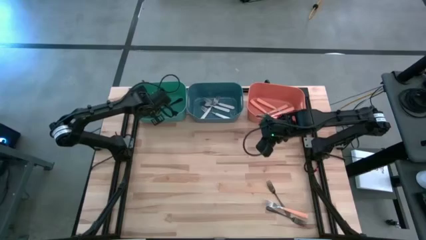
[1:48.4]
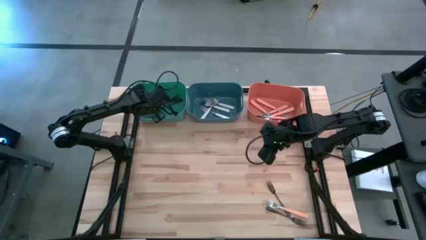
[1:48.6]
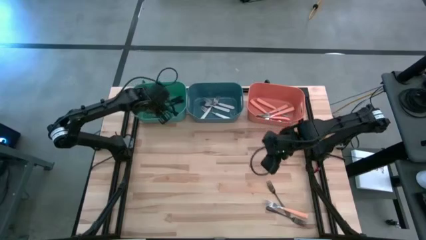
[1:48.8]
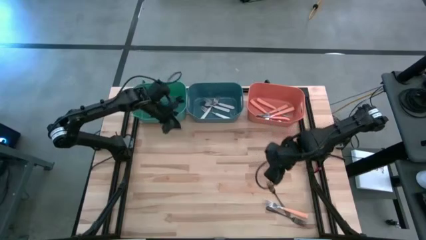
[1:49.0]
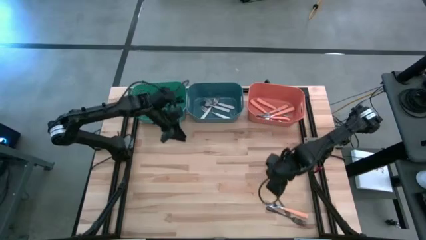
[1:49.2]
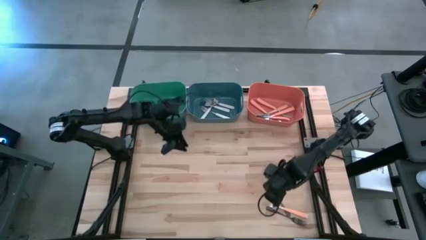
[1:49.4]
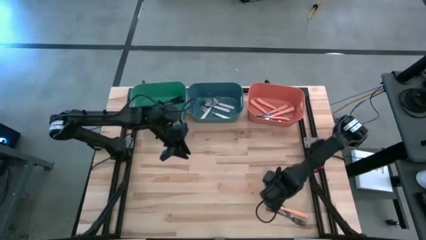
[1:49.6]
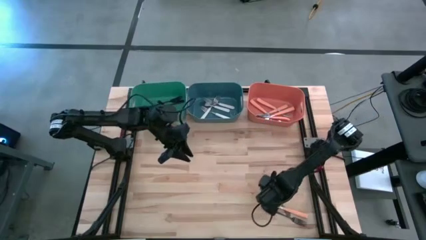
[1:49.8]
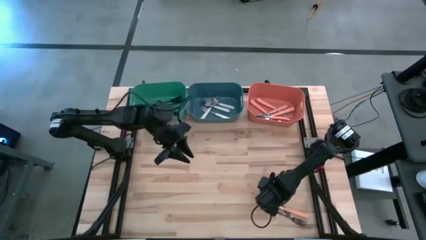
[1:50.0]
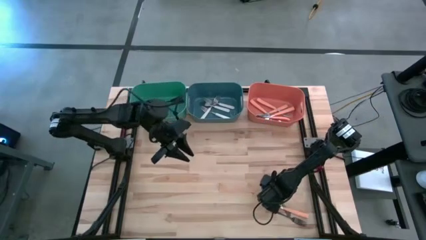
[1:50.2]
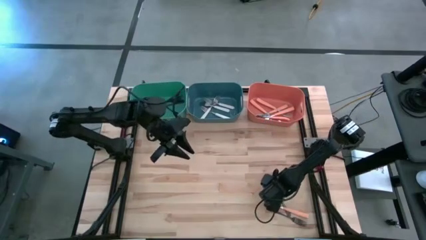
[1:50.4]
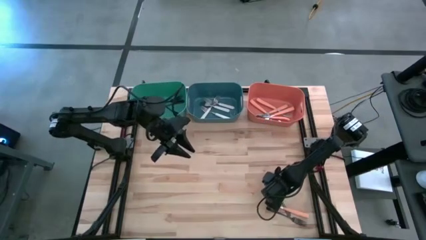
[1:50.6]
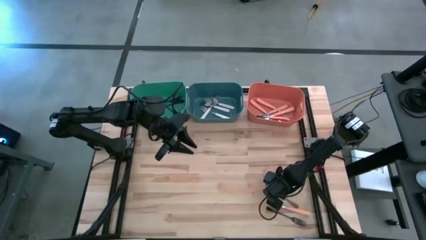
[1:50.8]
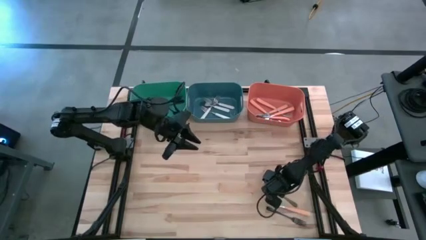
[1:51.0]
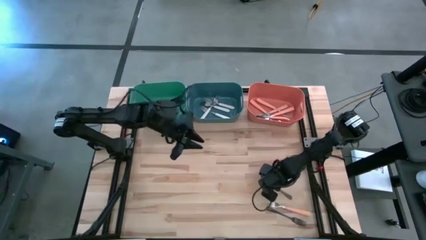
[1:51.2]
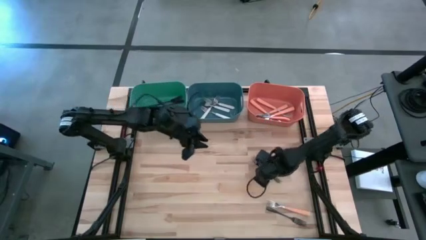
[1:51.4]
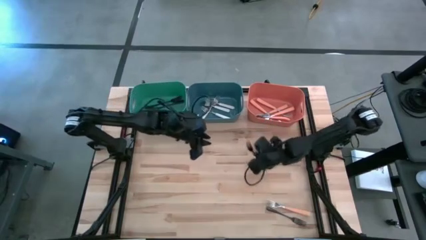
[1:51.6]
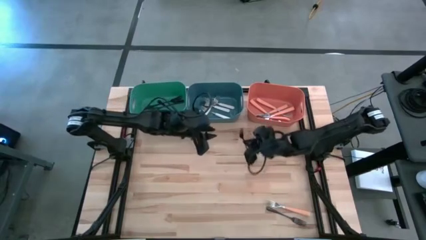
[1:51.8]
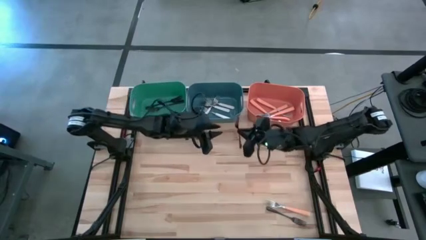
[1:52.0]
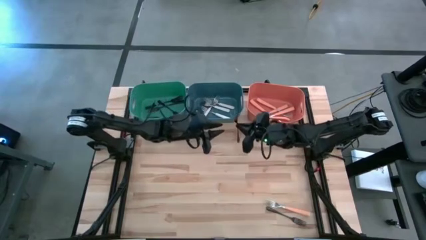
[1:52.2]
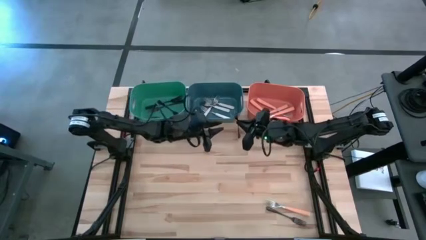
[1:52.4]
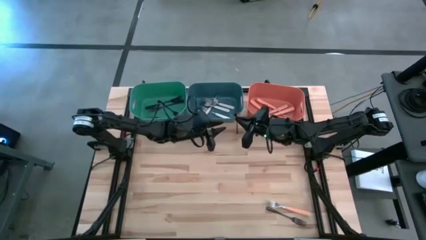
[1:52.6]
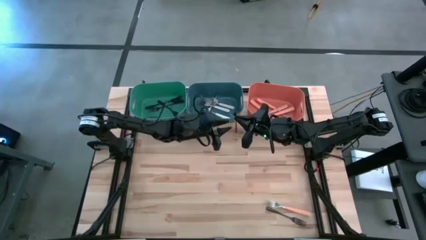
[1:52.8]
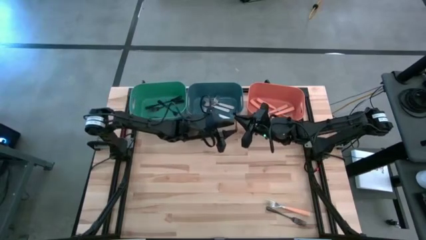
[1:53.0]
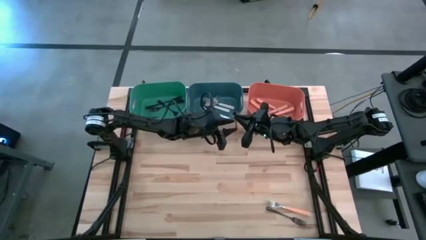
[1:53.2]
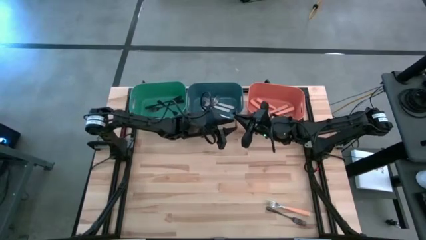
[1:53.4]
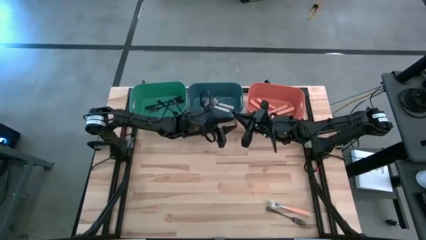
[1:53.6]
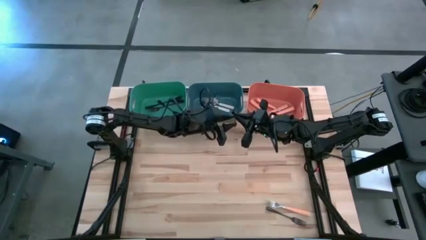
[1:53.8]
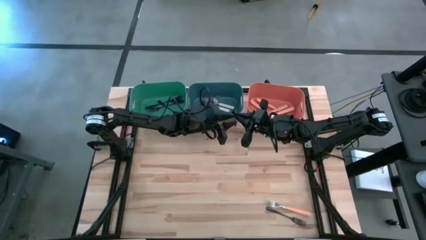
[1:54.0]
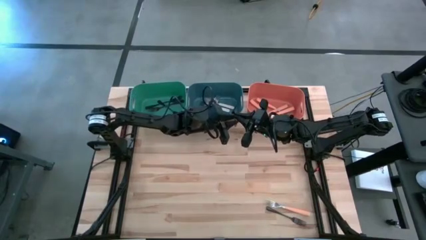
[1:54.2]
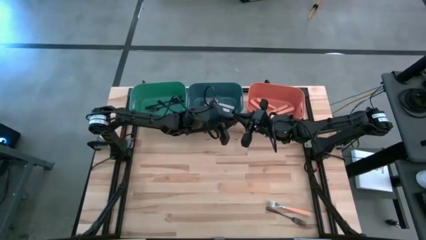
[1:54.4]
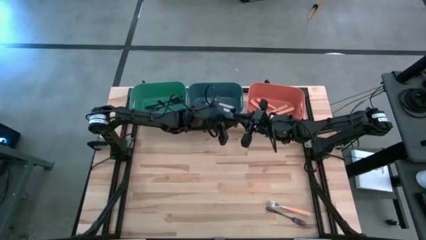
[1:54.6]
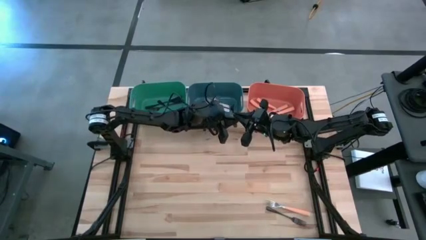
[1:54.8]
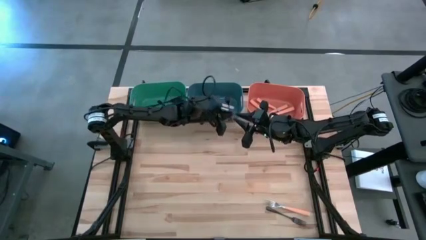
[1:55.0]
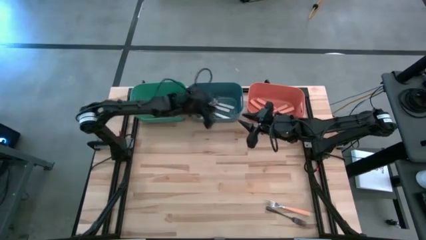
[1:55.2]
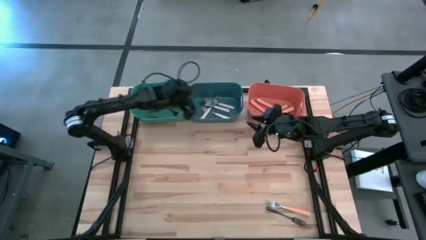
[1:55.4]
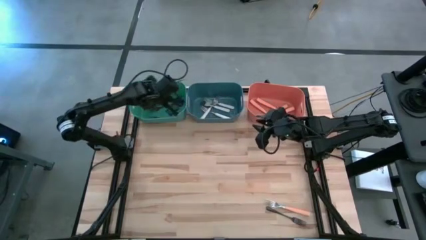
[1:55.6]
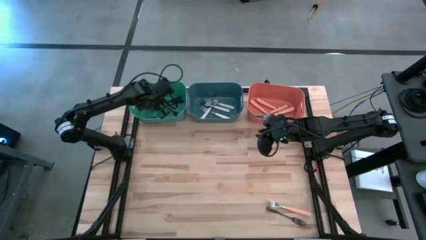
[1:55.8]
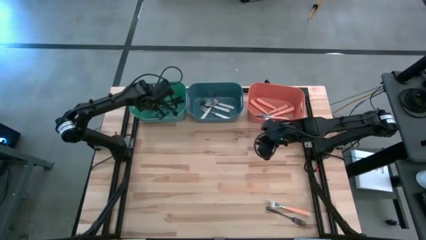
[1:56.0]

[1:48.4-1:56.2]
Task: Sort silverware by color (type)
Put the black fork into the green bin

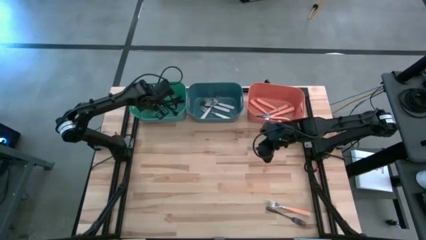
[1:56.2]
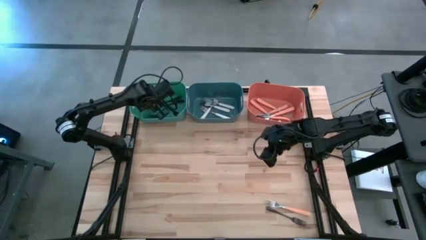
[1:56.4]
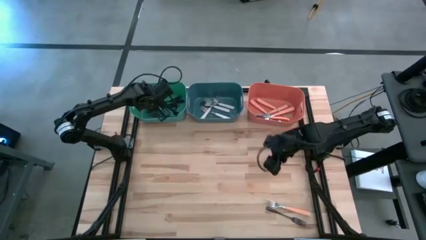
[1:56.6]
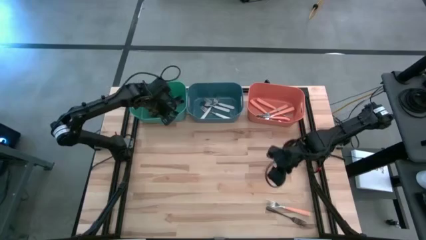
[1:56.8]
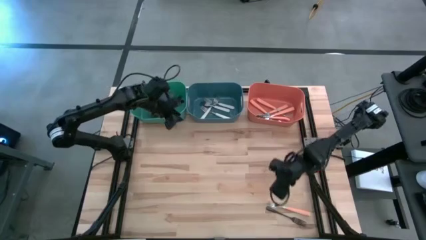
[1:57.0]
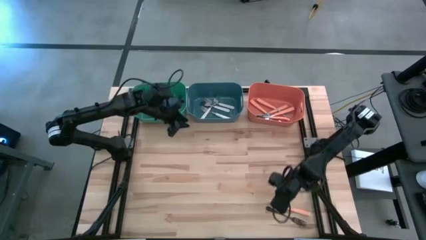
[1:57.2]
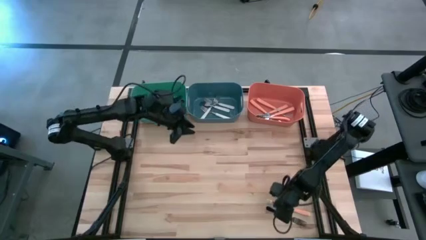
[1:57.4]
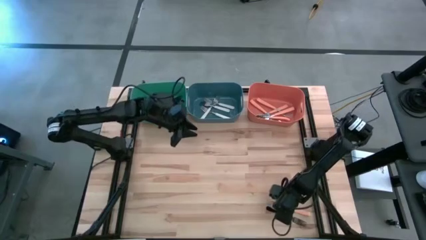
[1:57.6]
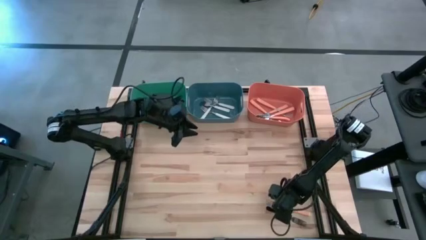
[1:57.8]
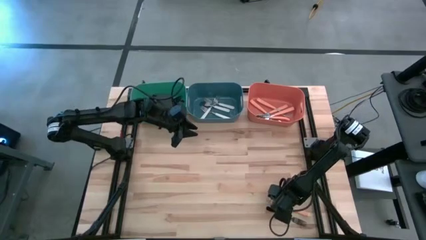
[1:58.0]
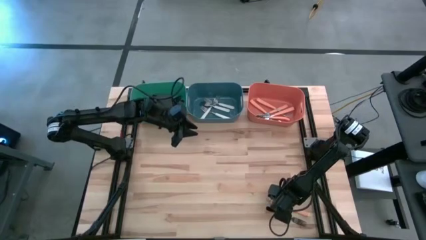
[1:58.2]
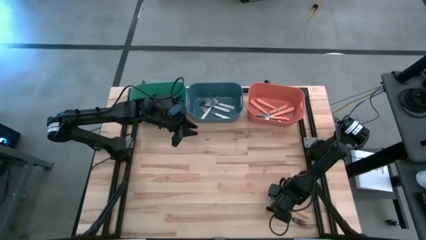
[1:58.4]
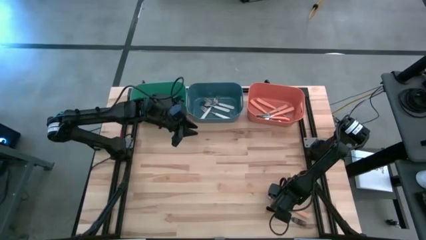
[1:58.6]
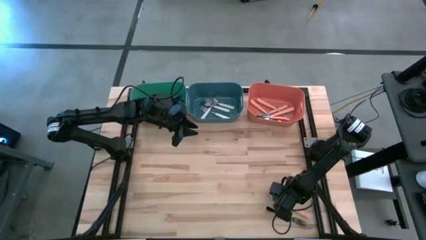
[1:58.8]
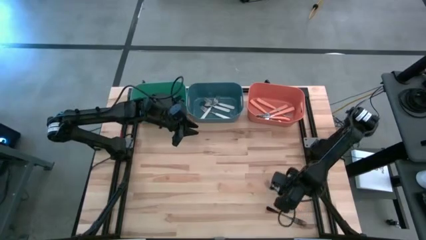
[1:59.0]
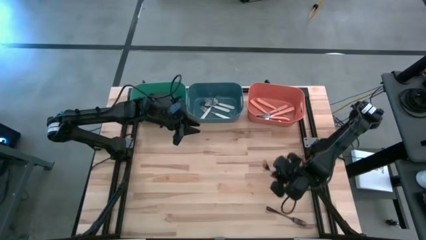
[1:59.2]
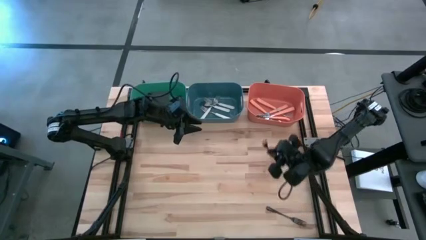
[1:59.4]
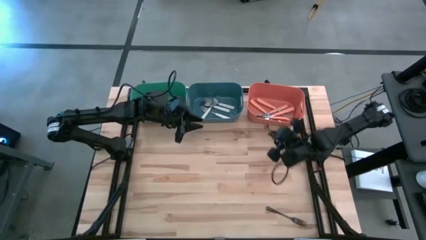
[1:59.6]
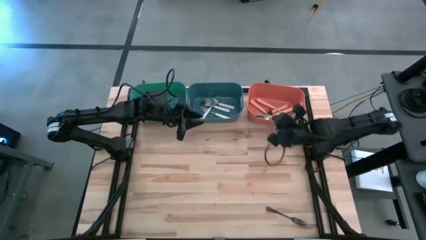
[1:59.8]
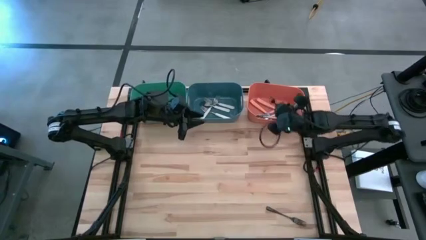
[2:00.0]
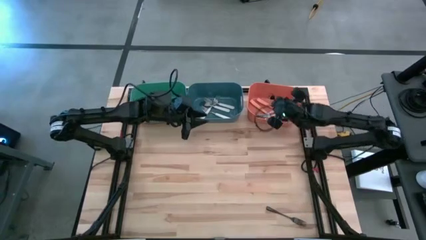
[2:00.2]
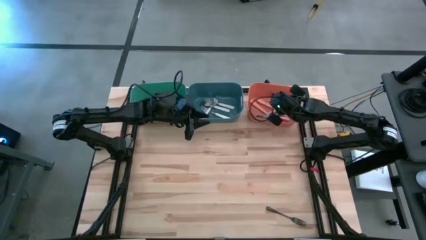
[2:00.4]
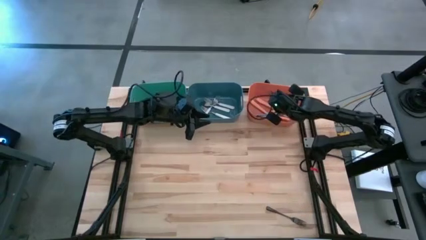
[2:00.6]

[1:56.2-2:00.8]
Put the orange fork into the orange bin

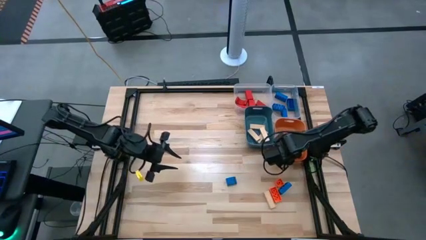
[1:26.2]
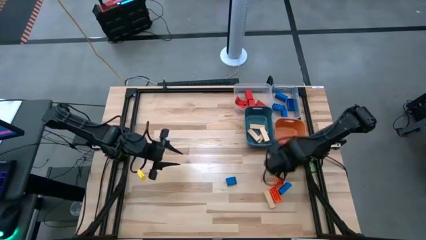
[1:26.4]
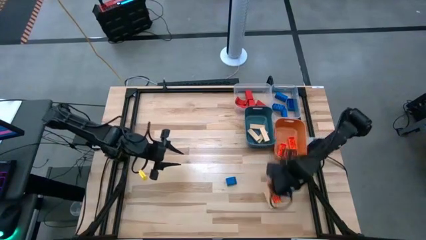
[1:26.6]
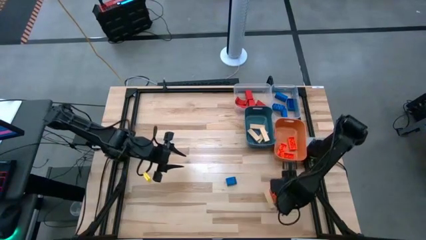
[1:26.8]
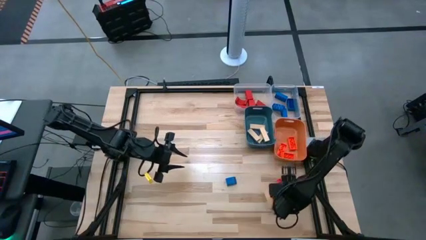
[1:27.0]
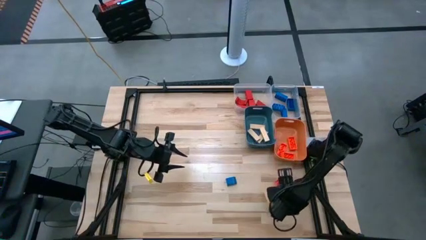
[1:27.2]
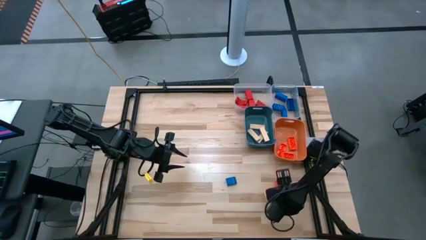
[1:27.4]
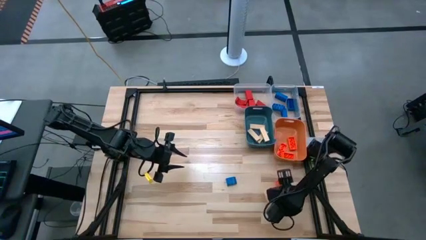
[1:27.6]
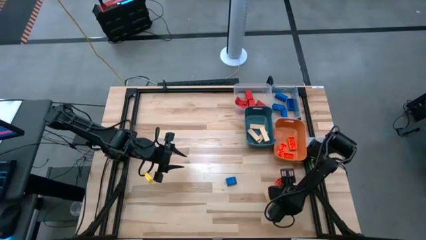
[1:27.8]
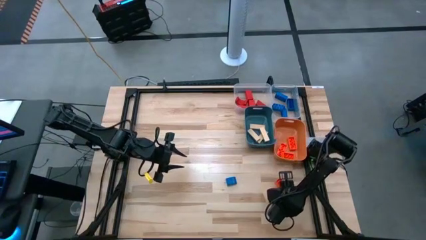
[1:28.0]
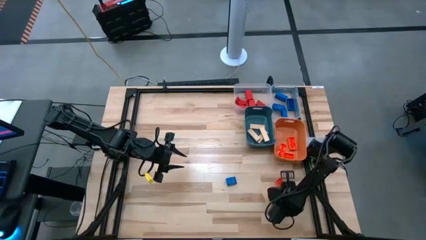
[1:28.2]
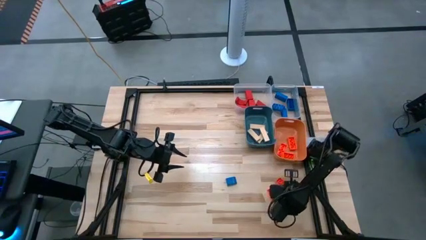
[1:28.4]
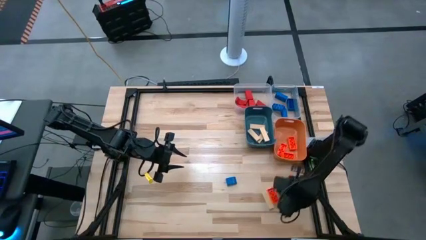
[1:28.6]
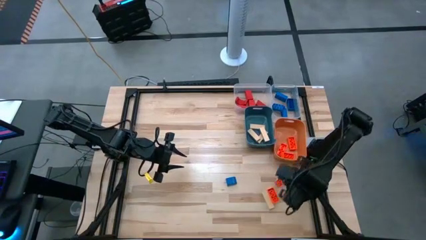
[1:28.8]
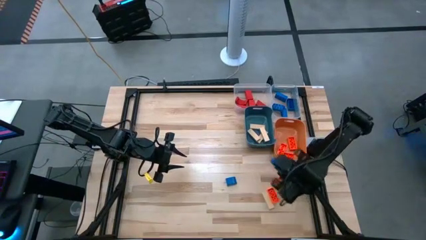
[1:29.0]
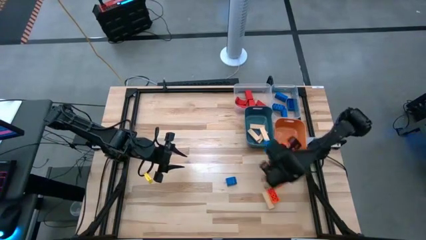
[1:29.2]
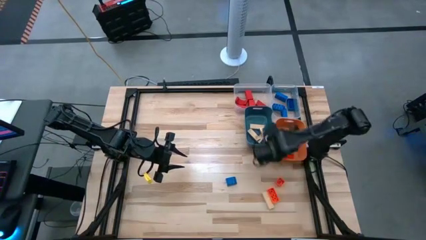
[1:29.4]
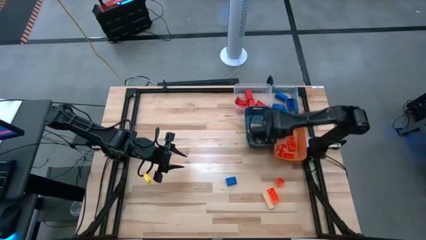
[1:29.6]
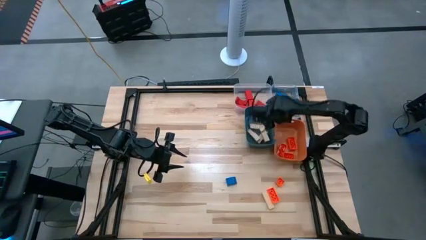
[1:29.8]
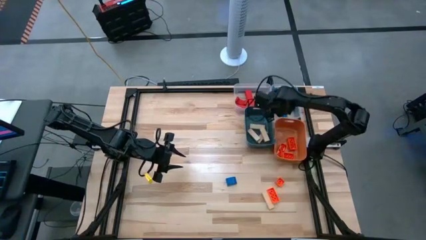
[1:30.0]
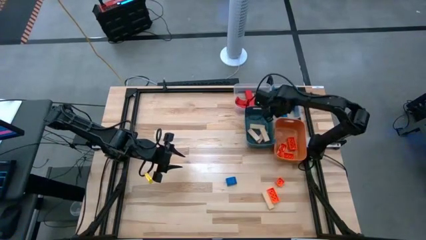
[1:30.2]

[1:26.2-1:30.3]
Task: Sort blocks
Put the 8 stud blue game piece into the right transparent bin
